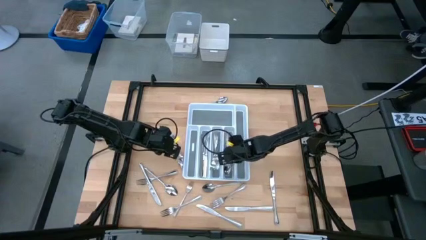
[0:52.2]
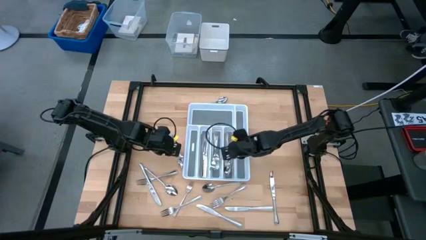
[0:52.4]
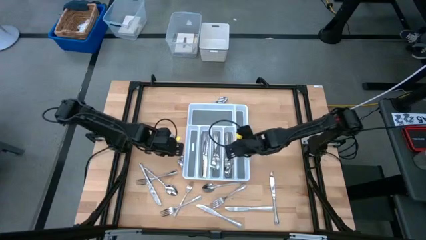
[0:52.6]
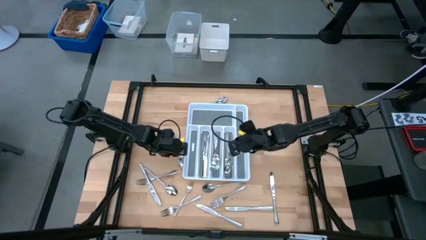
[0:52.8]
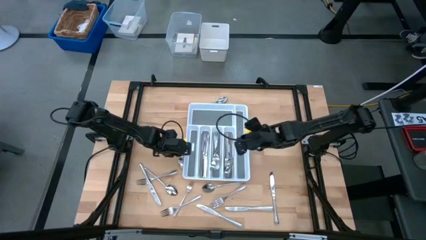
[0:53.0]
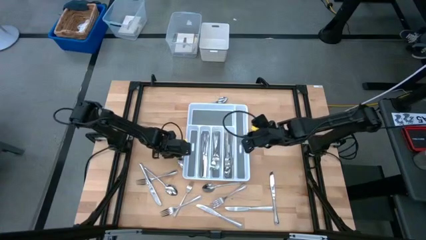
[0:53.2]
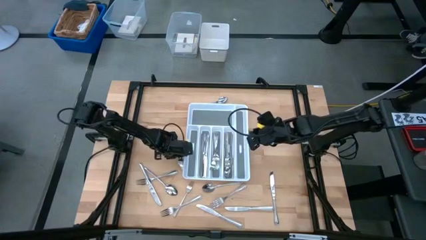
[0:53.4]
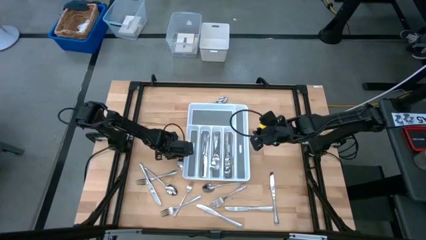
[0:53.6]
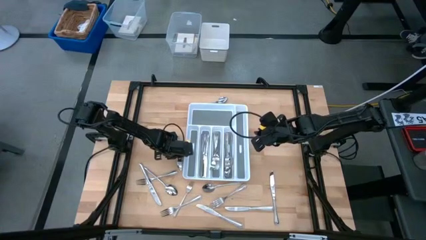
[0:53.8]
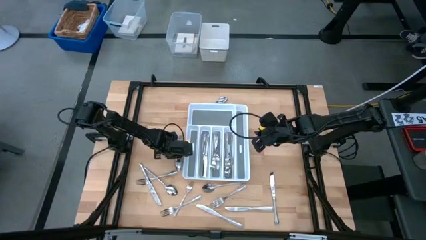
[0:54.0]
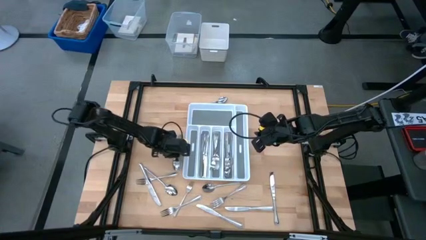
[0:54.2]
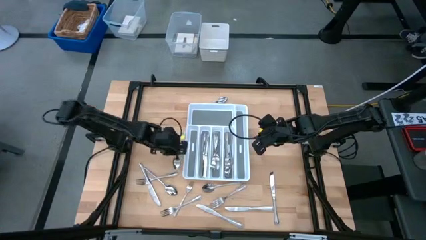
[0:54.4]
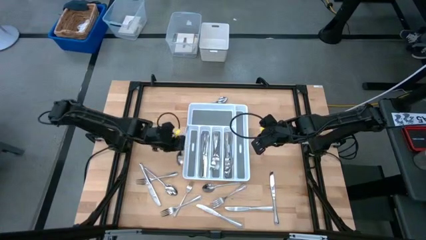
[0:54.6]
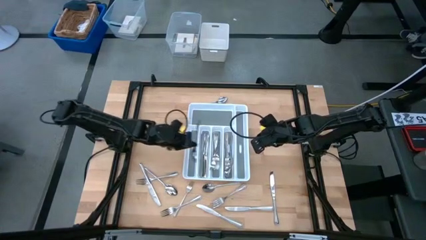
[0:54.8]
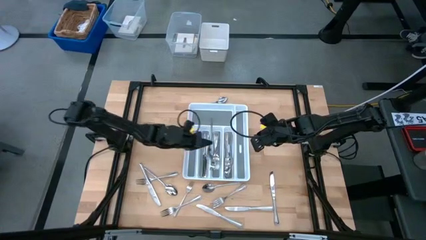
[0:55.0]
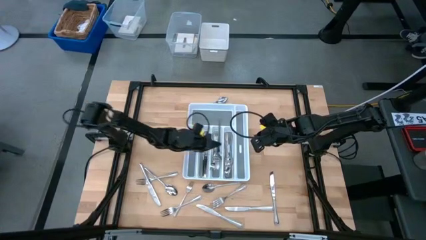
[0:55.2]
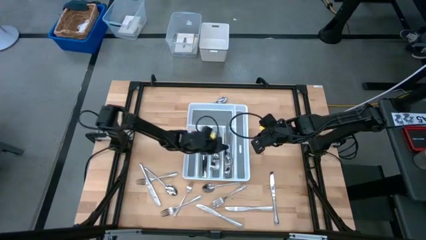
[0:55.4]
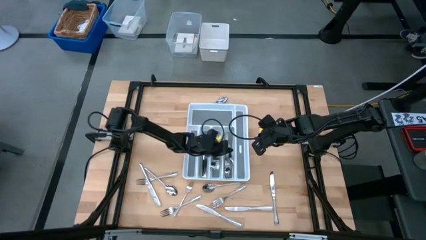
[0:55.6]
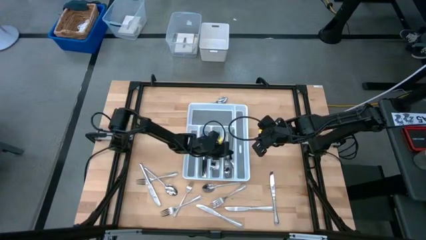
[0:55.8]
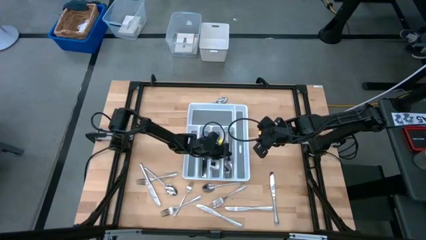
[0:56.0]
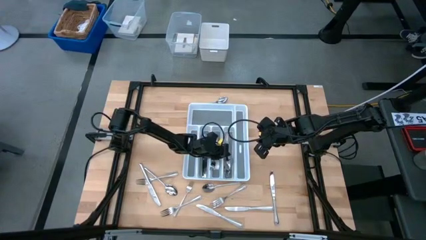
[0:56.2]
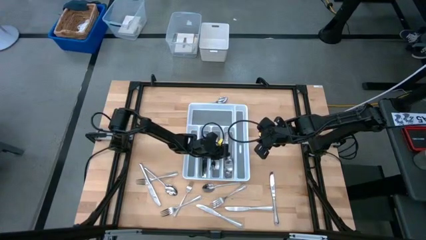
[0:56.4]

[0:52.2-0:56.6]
Task: Sort silverware
Put the silver spoon into the white cutlery tray

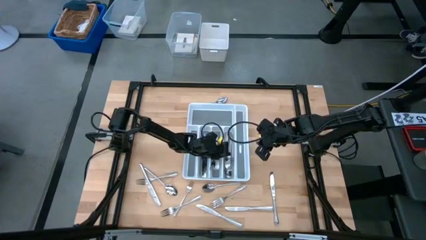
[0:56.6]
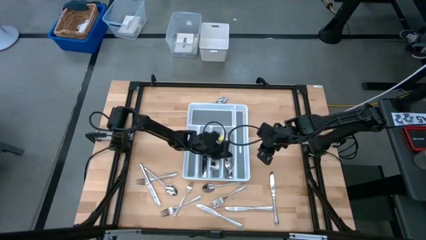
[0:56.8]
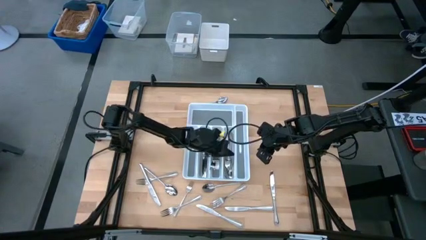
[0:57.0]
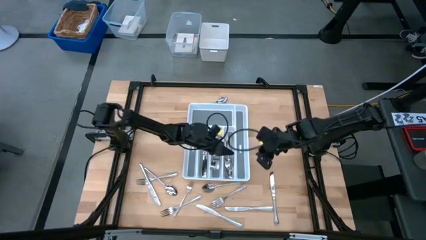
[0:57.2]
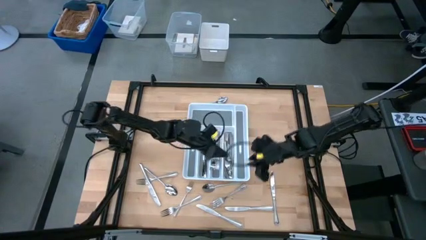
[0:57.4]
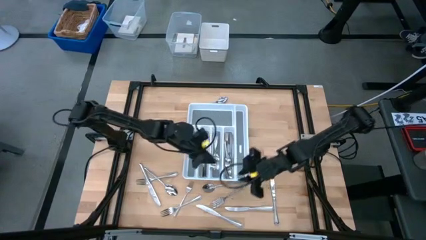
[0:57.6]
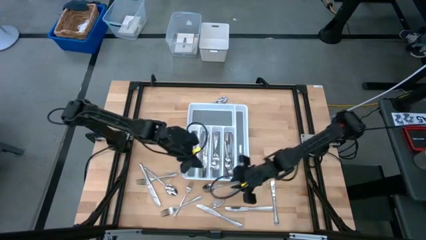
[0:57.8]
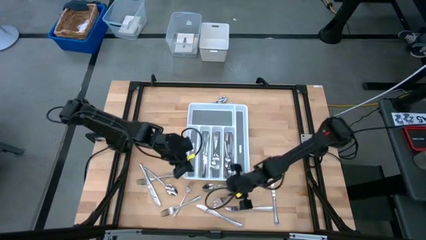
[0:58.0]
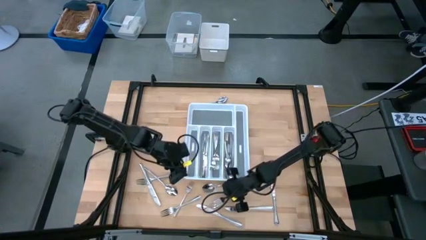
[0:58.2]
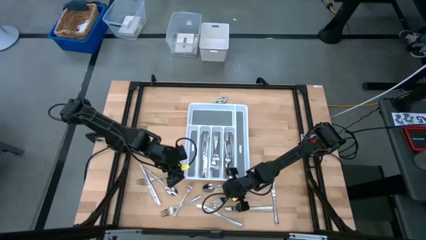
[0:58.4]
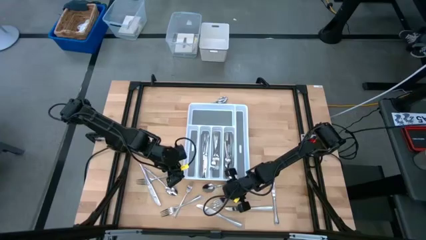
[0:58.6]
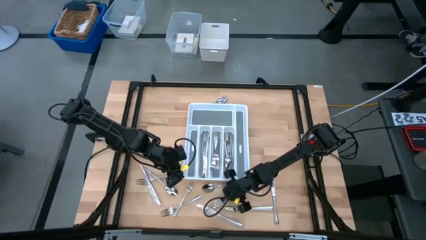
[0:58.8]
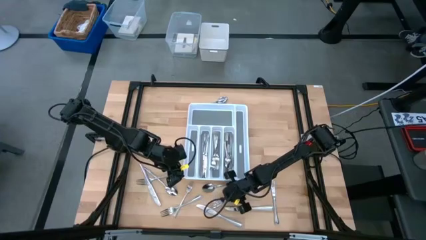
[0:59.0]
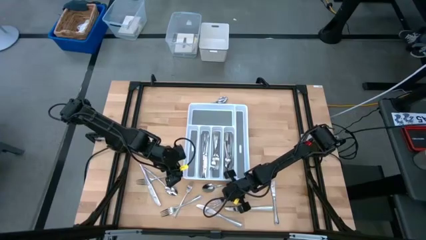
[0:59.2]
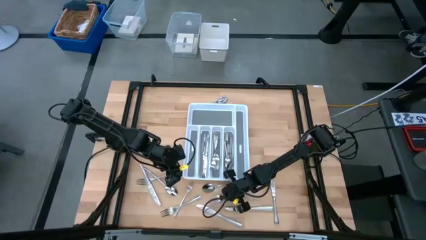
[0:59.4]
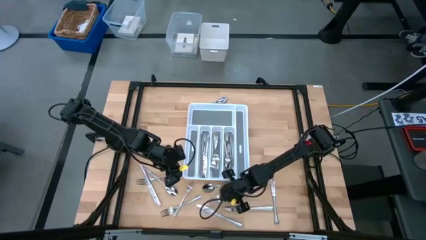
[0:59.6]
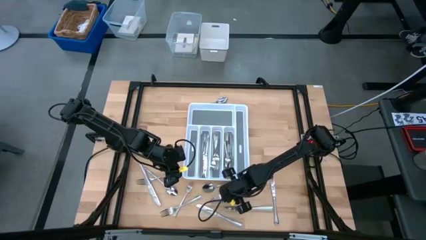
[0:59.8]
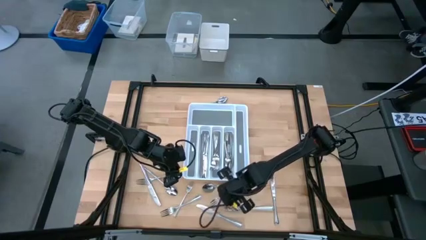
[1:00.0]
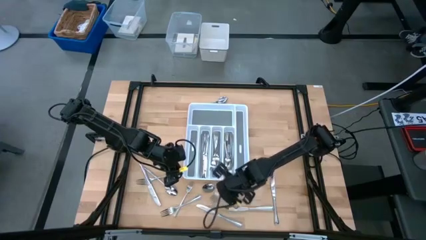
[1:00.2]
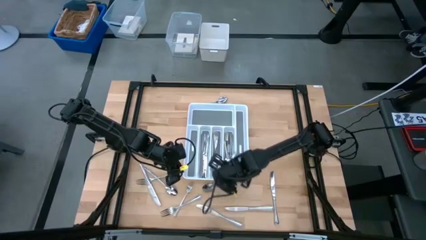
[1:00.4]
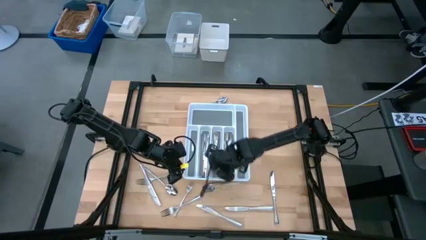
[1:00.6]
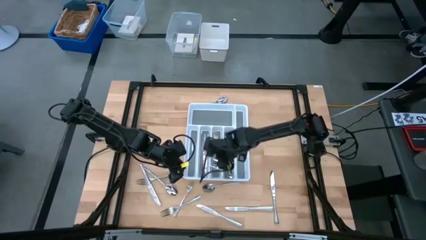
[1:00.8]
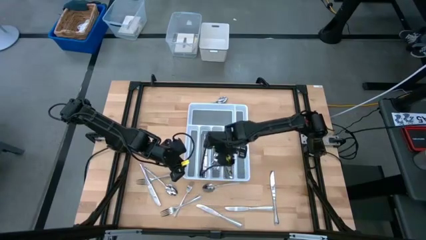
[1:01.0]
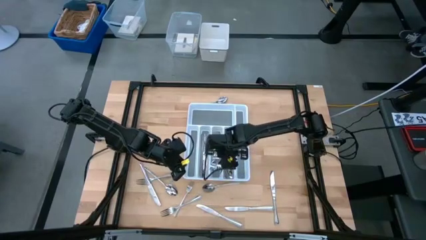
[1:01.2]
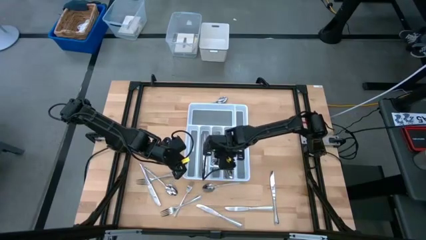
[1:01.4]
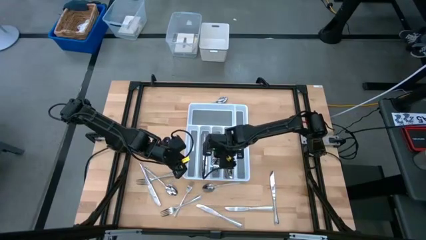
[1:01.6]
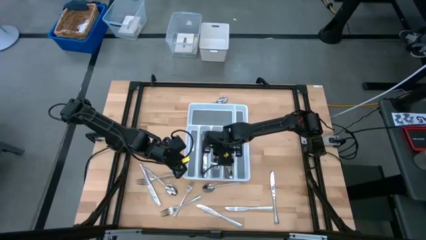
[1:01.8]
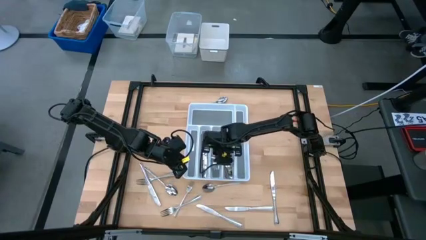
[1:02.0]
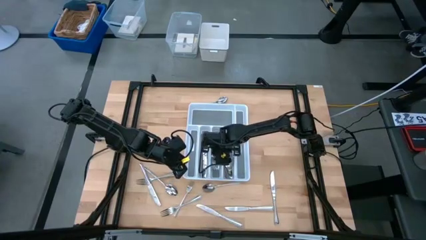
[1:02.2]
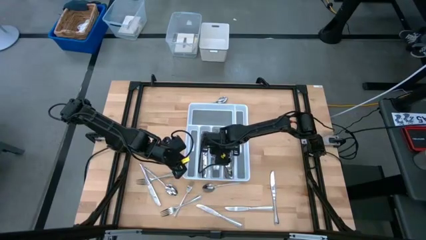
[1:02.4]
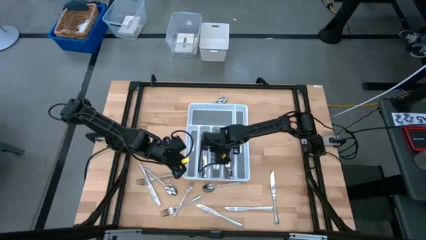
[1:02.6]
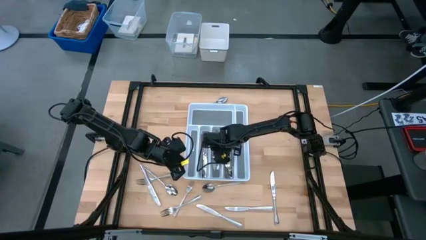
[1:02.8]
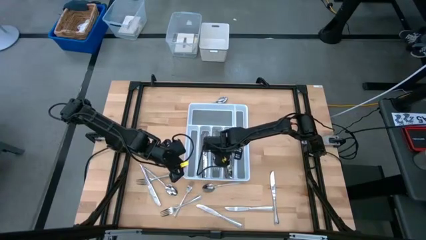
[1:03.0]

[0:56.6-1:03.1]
Put the silver fork into the white cutlery tray

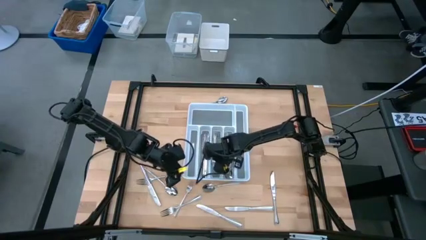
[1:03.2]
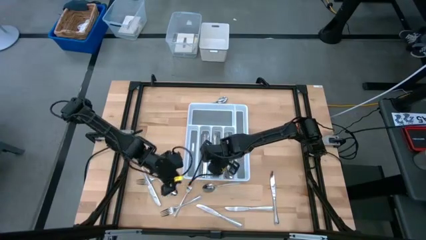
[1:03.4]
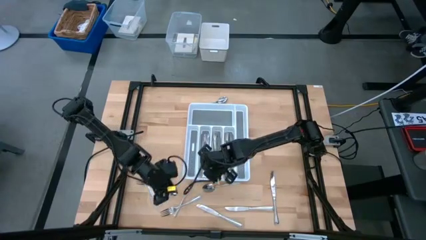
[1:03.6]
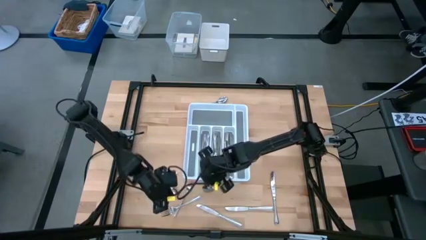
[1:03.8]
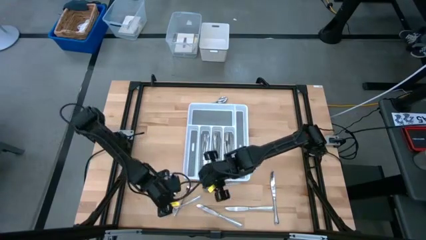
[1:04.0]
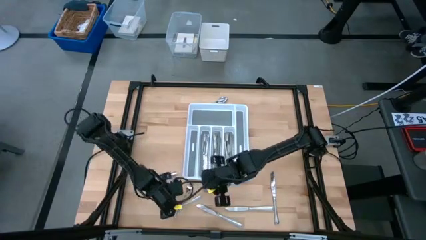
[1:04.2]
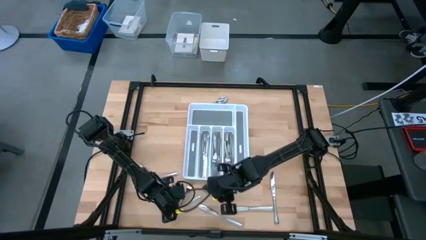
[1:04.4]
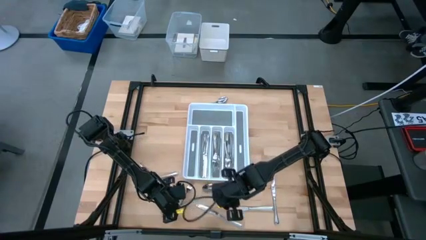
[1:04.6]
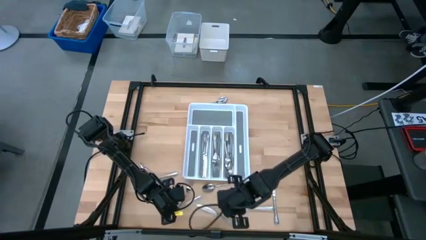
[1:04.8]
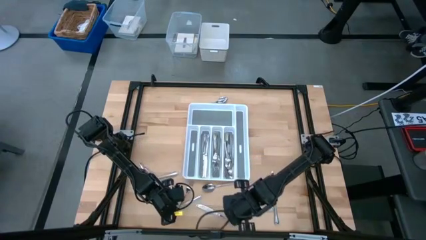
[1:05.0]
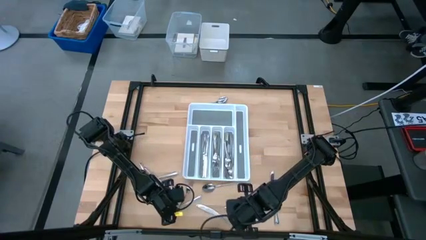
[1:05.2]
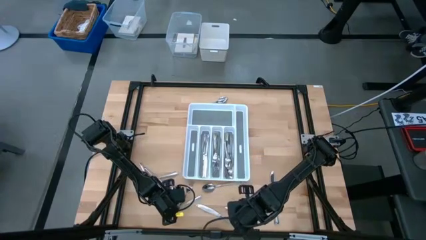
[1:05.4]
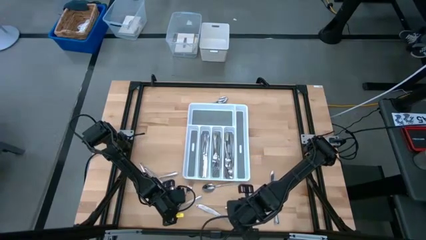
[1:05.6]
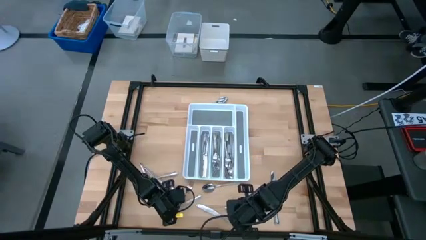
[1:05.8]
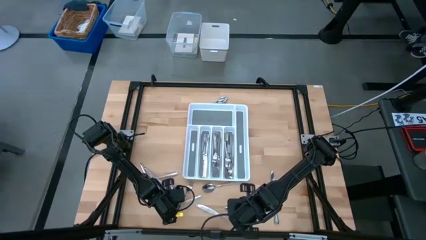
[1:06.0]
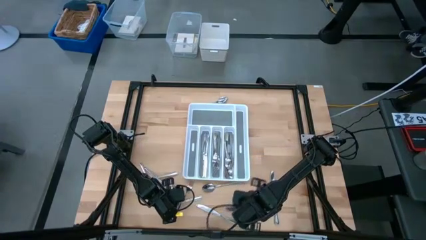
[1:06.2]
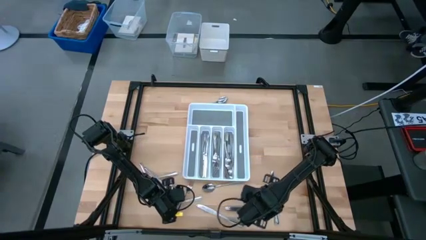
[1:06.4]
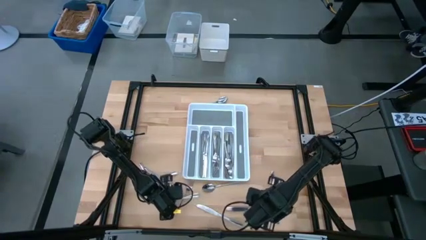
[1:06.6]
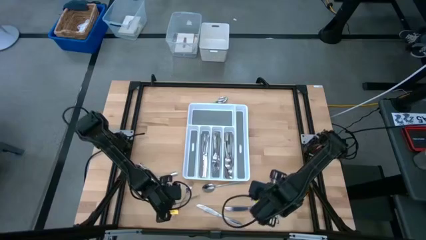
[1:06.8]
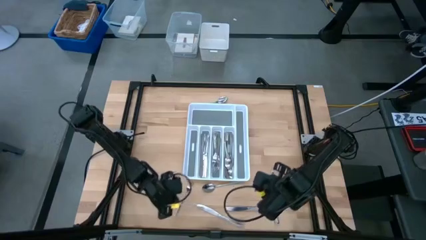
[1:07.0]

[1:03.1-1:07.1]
Put the silver fork into the white cutlery tray

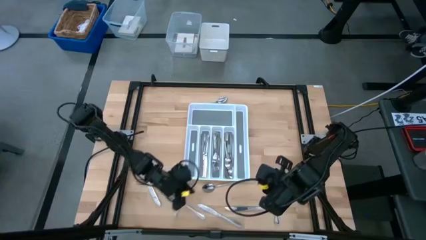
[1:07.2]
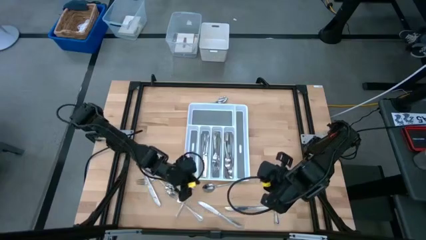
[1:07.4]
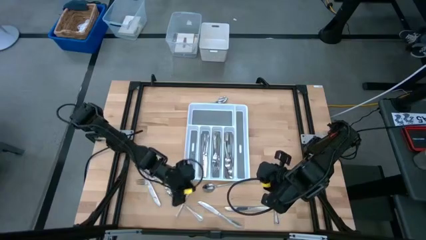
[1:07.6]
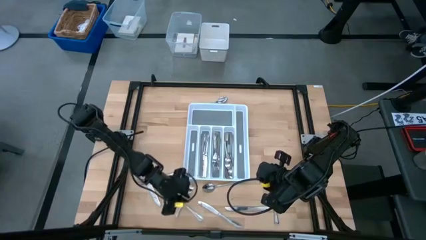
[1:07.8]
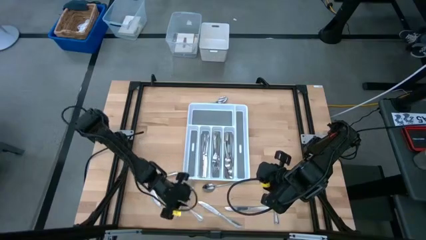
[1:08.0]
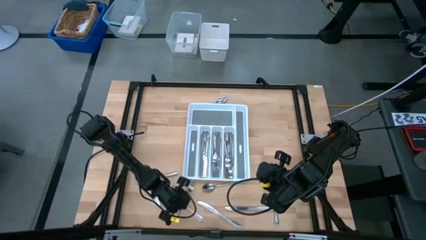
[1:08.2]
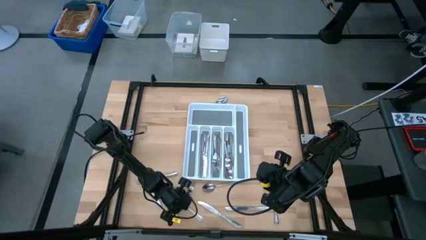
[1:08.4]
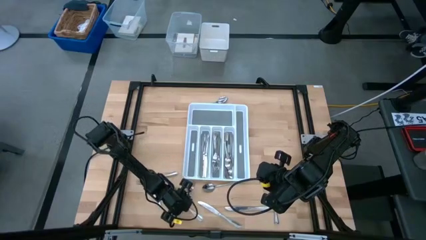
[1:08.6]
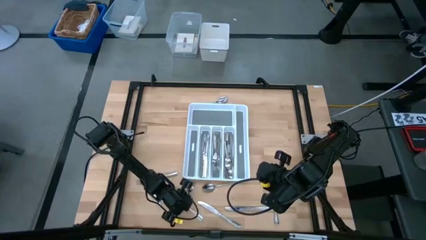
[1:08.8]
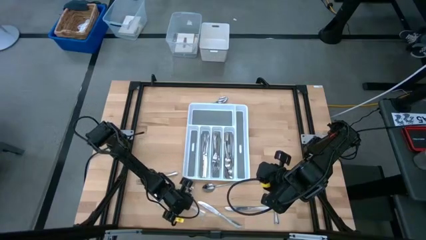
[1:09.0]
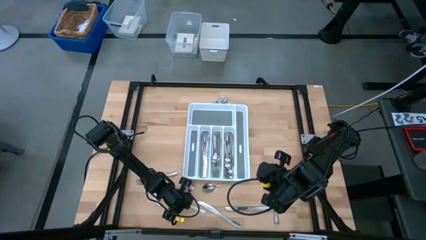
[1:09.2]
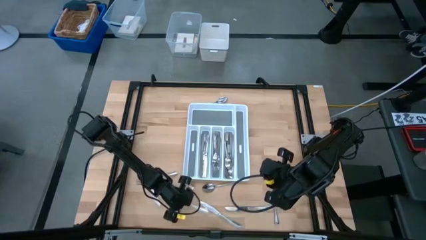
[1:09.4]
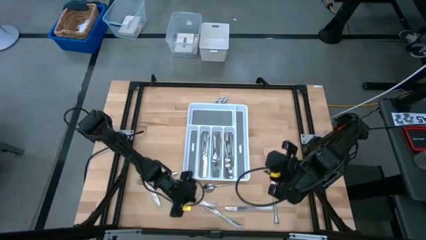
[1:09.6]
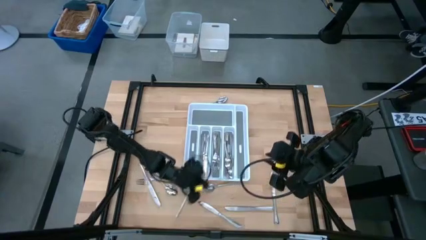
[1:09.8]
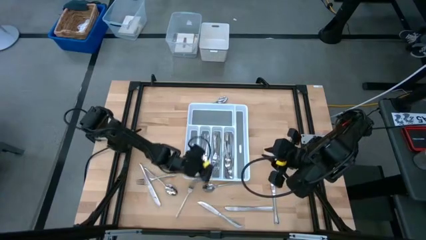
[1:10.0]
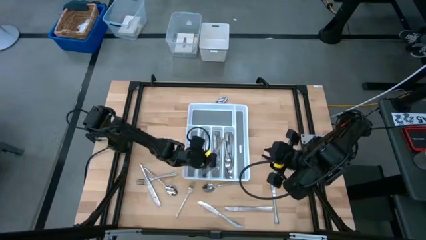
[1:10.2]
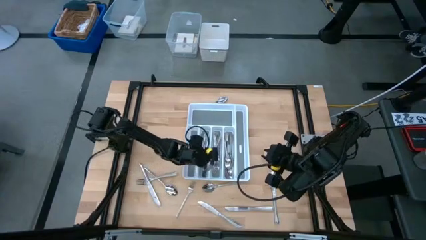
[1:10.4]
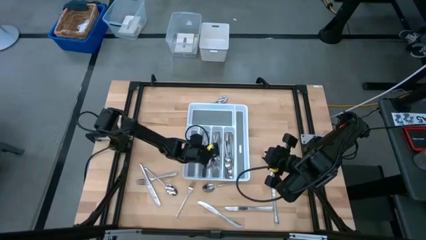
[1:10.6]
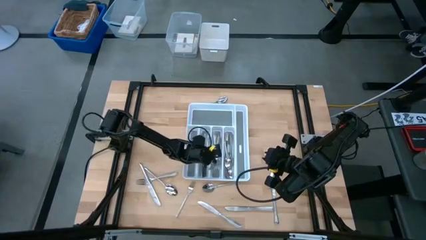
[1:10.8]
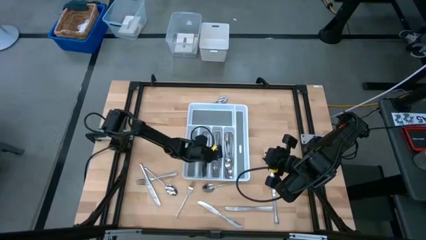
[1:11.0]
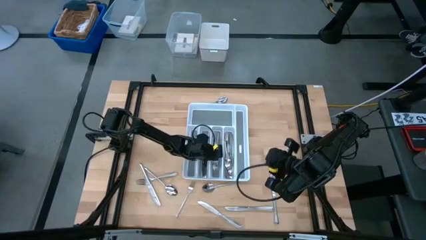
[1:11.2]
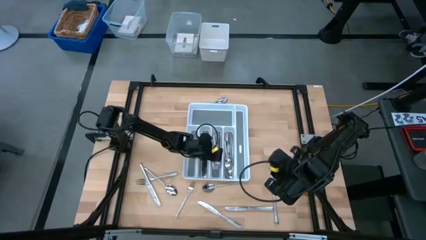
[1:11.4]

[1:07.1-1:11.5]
Put the silver fork into the white cutlery tray
